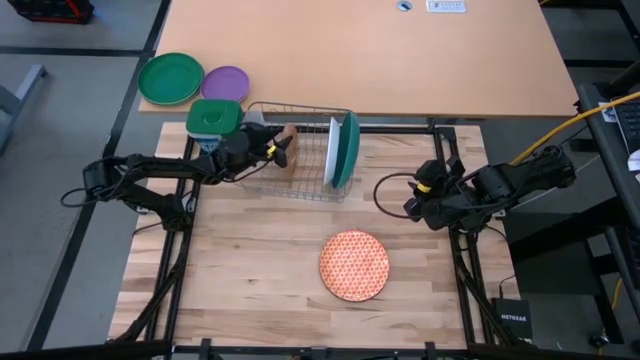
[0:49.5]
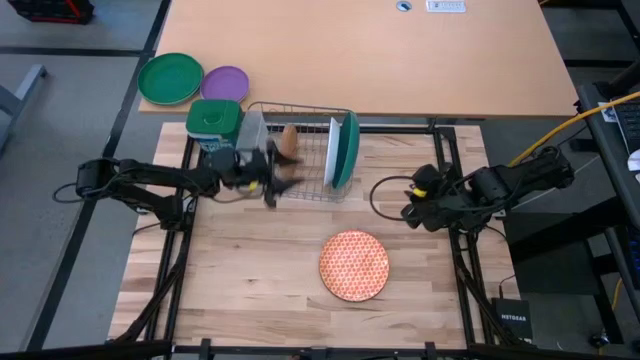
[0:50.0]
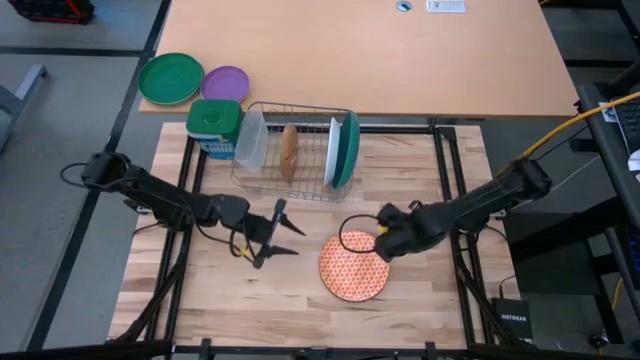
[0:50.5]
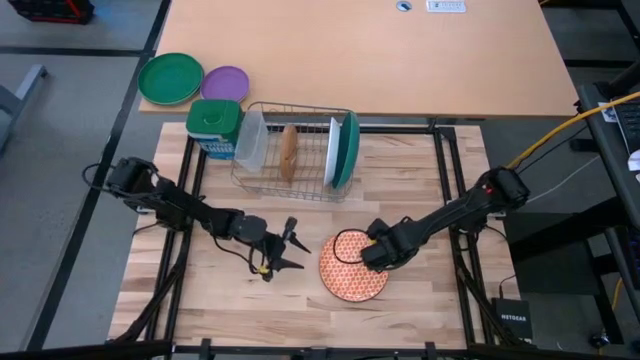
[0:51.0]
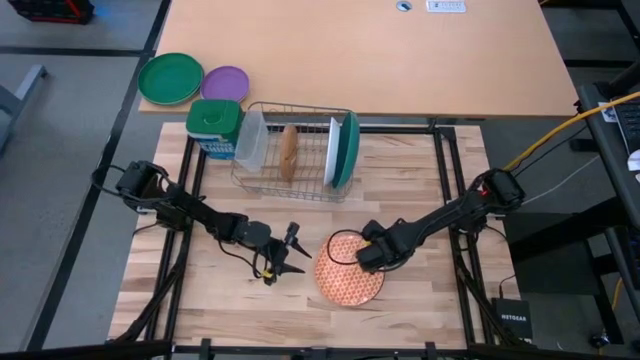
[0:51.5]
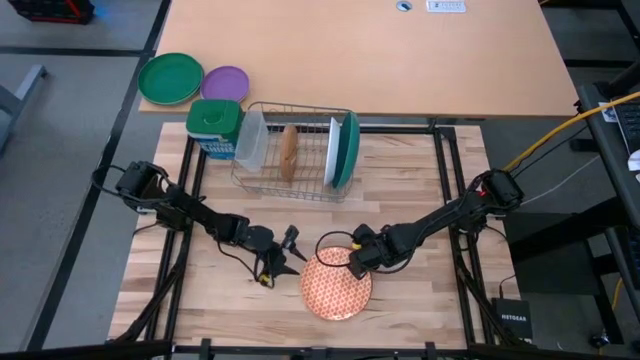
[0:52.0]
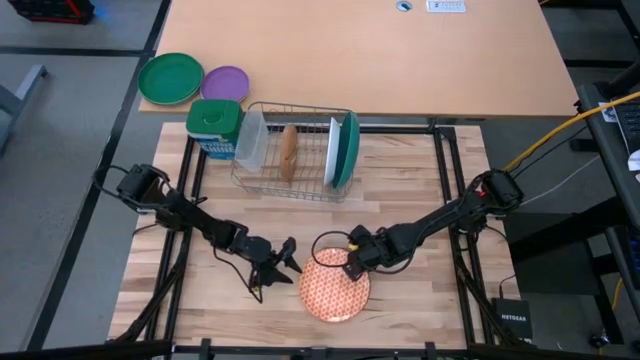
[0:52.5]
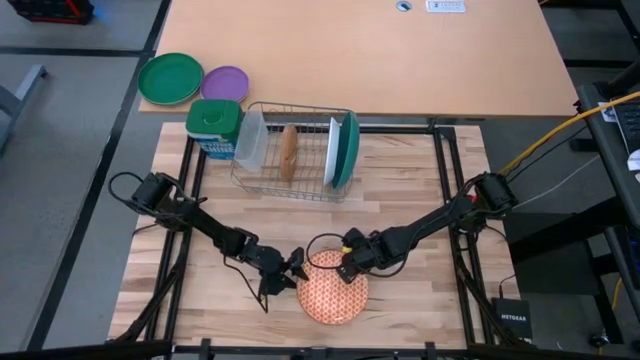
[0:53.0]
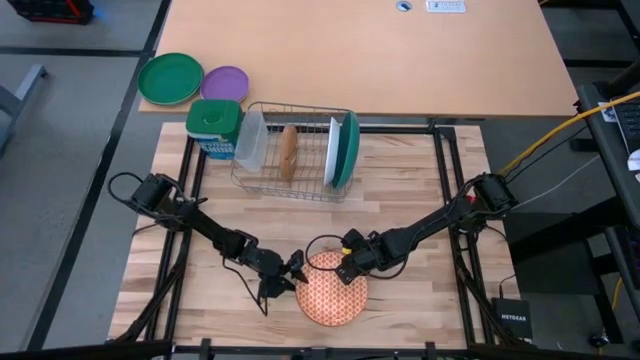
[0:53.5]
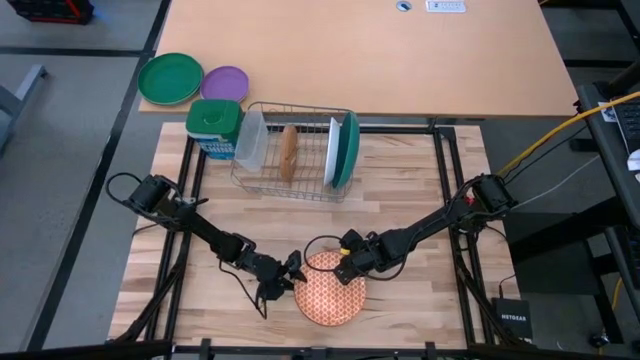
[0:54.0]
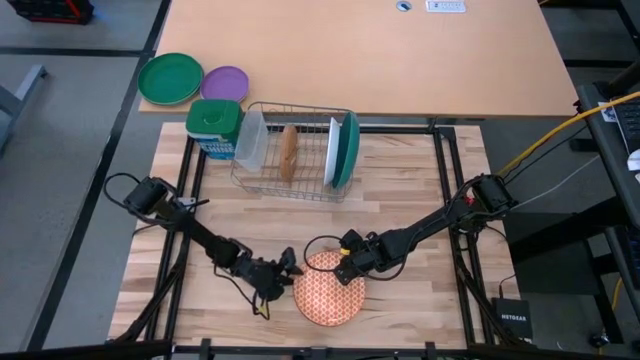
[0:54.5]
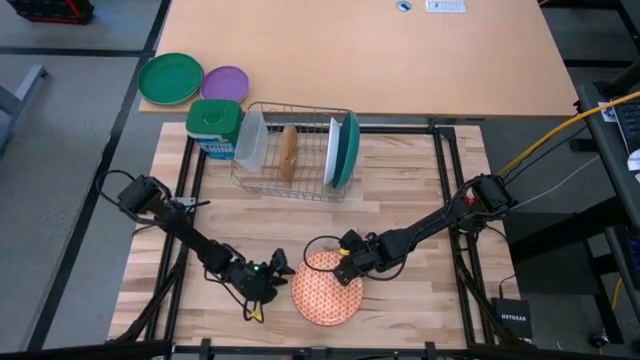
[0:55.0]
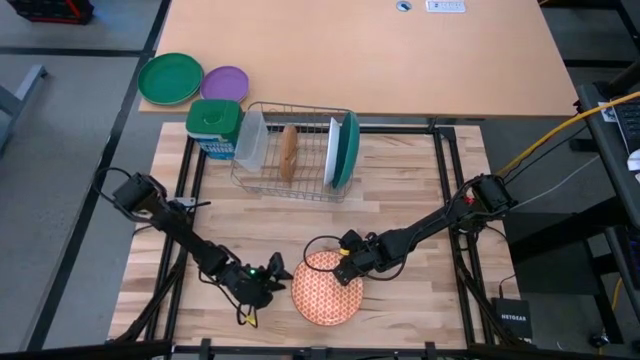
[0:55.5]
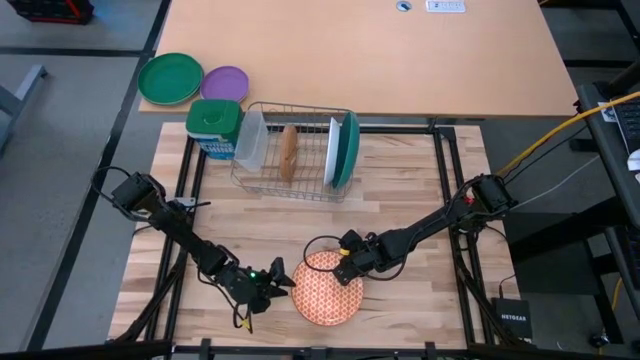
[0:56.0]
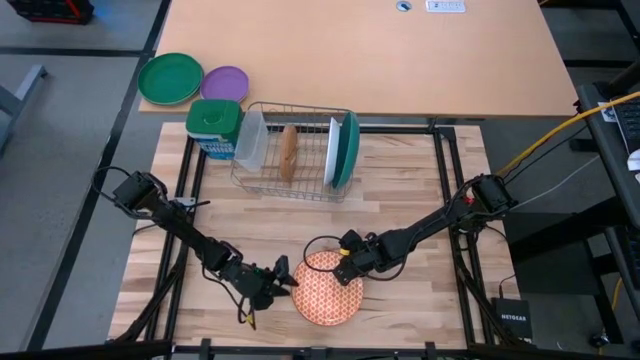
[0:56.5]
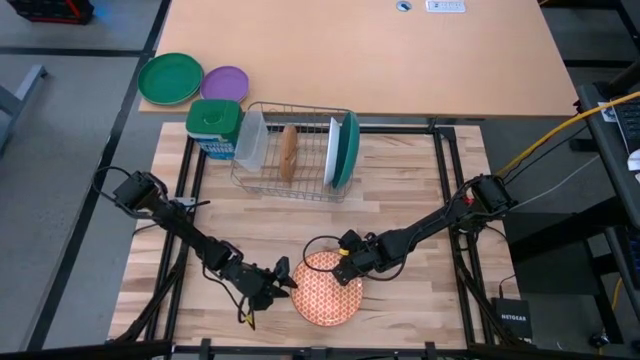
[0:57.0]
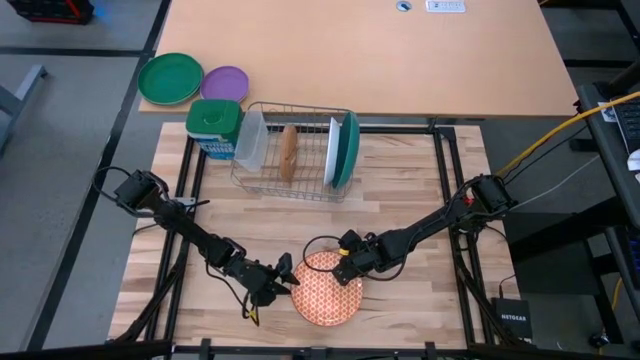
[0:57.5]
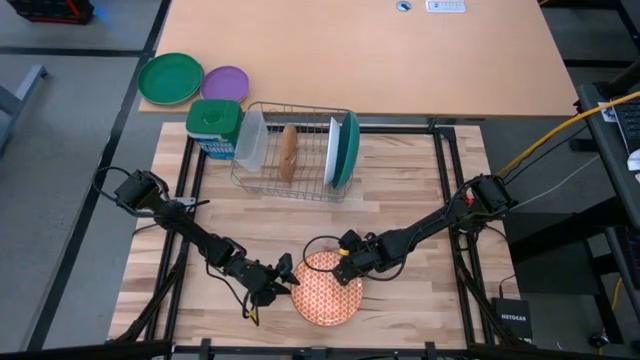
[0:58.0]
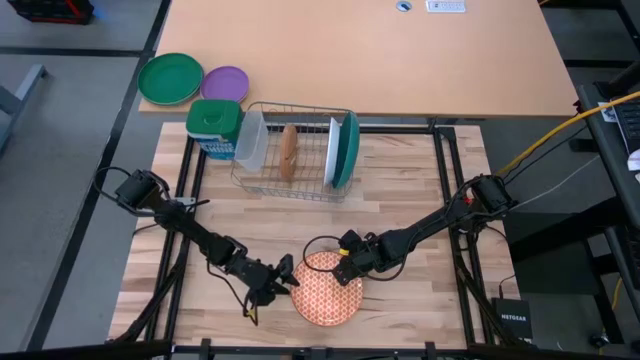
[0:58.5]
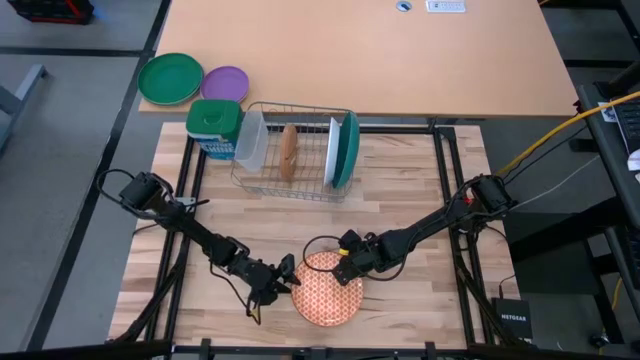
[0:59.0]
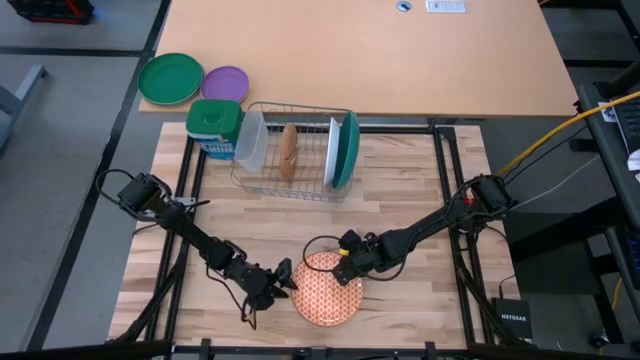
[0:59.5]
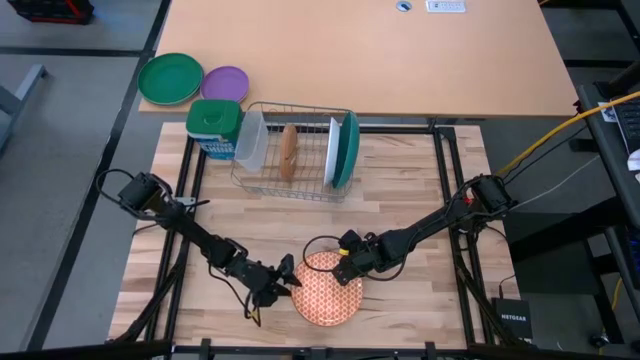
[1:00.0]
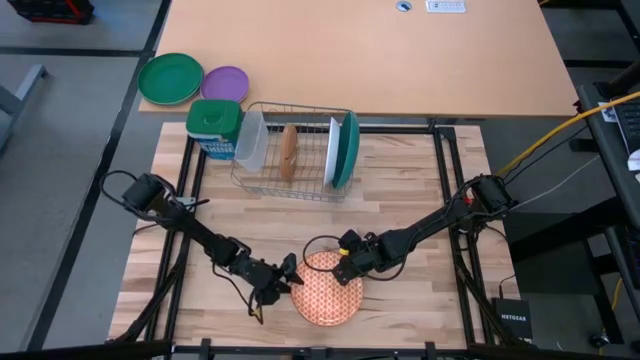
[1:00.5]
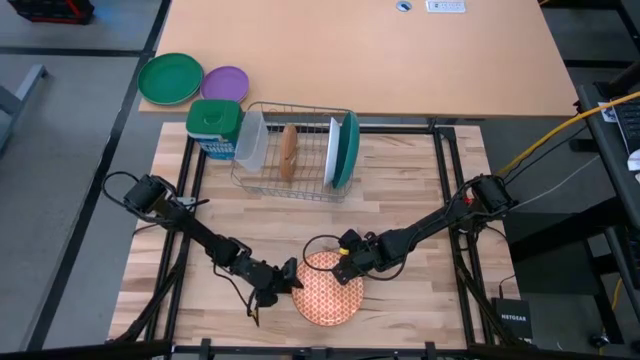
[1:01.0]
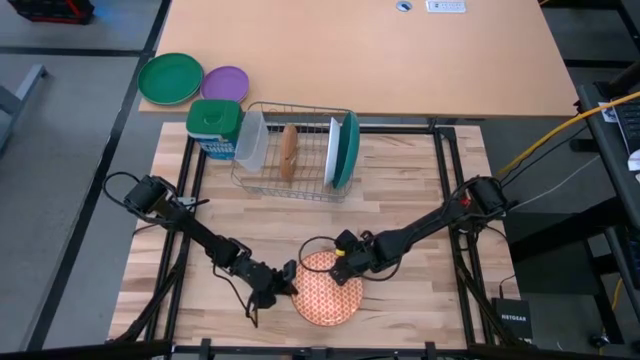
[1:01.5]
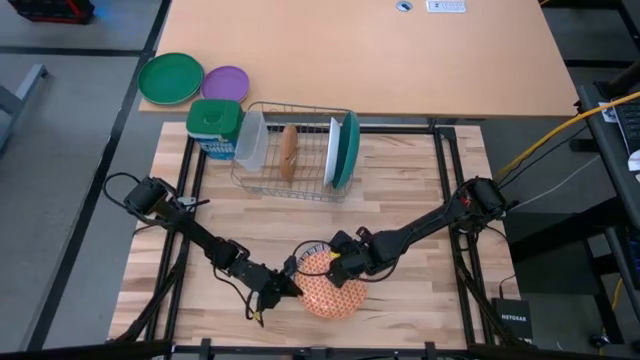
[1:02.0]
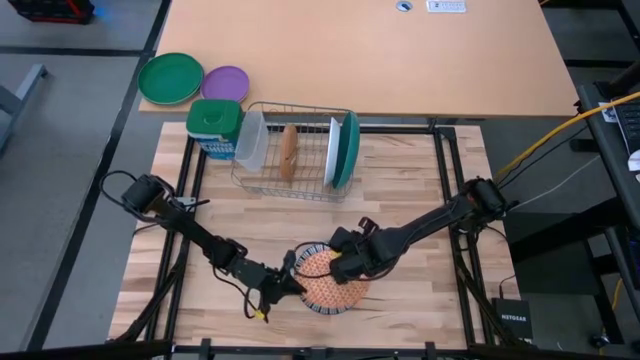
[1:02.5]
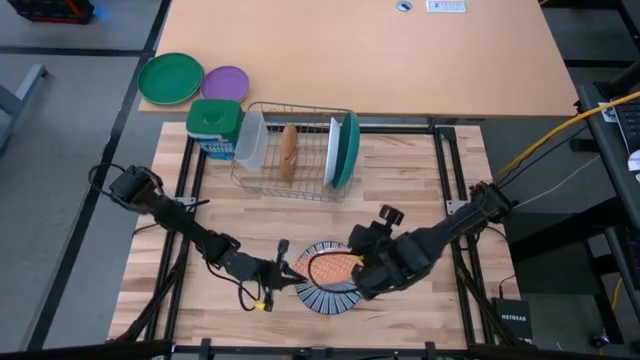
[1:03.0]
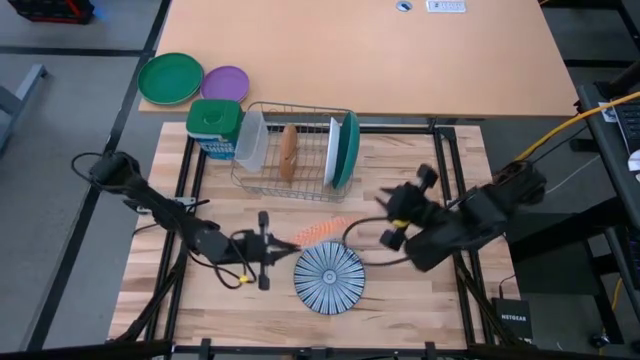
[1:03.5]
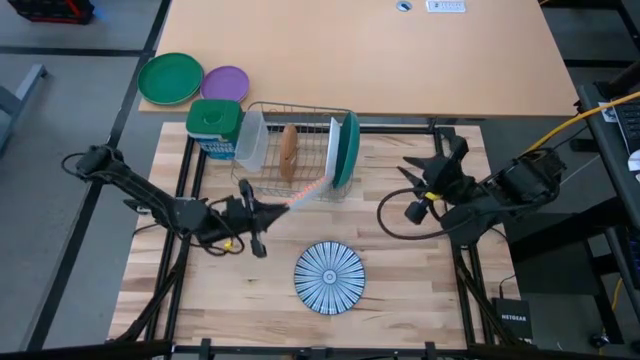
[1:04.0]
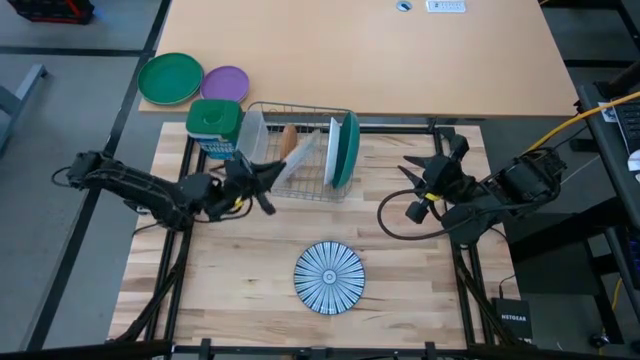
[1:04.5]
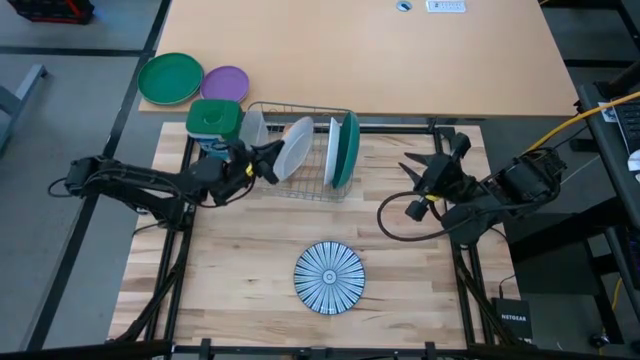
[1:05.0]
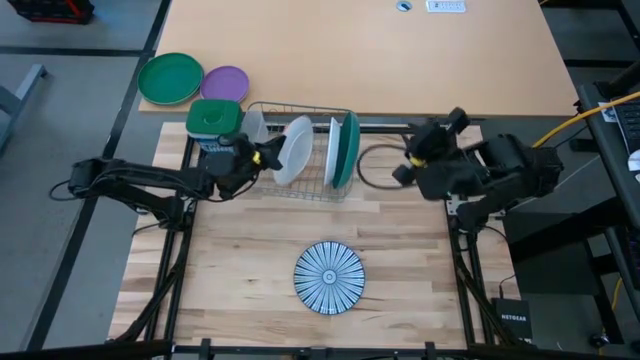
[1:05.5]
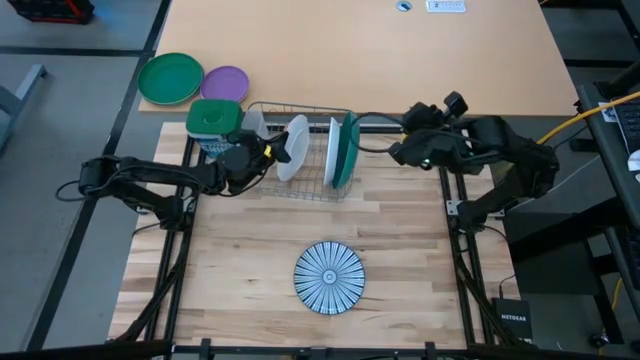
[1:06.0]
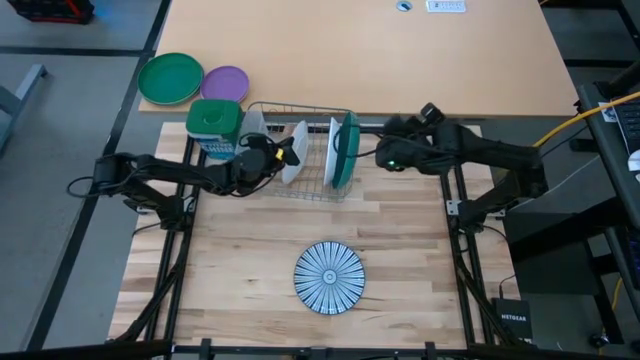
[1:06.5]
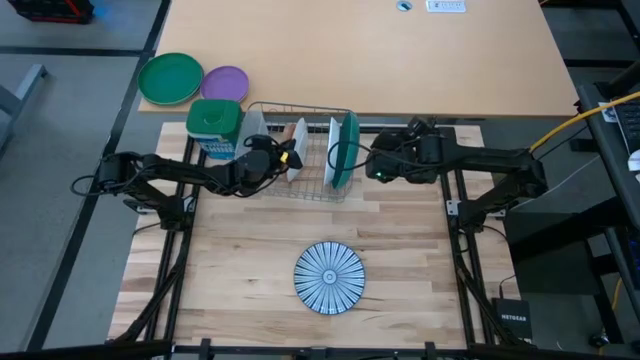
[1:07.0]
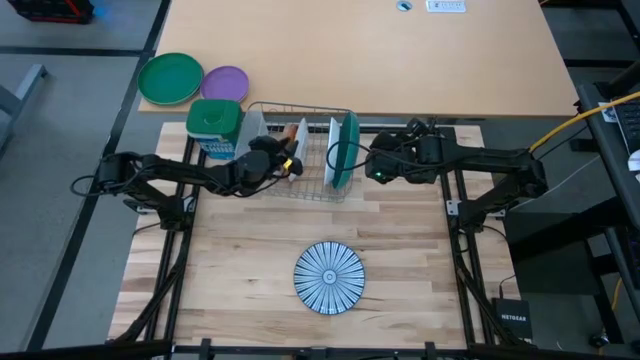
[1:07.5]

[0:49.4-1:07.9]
Task: Sort dishes
Put the orange patterned plate in the dish rack

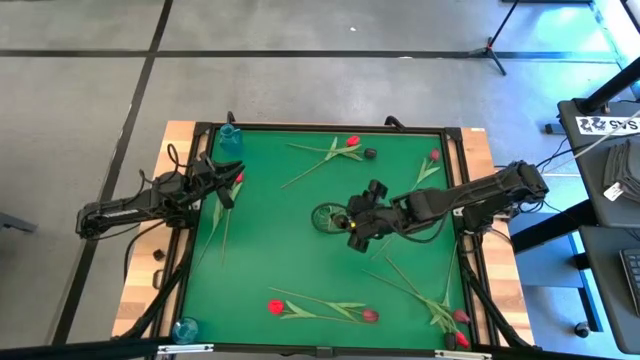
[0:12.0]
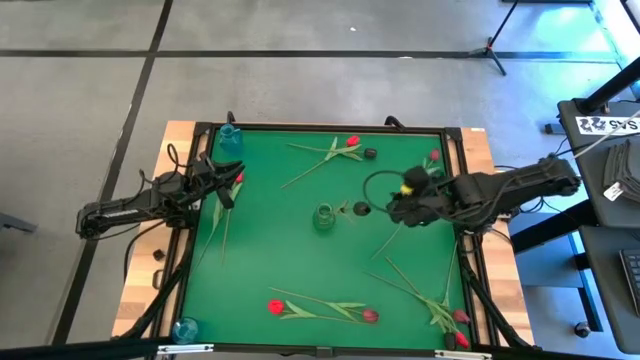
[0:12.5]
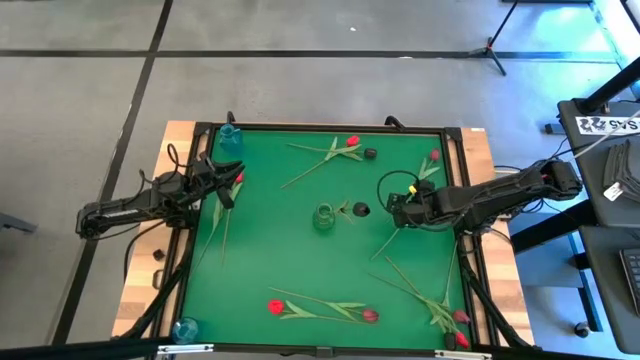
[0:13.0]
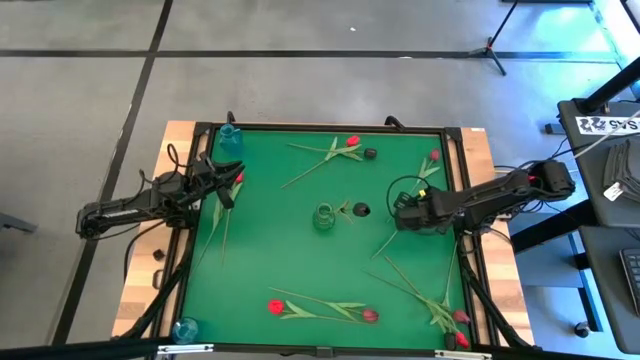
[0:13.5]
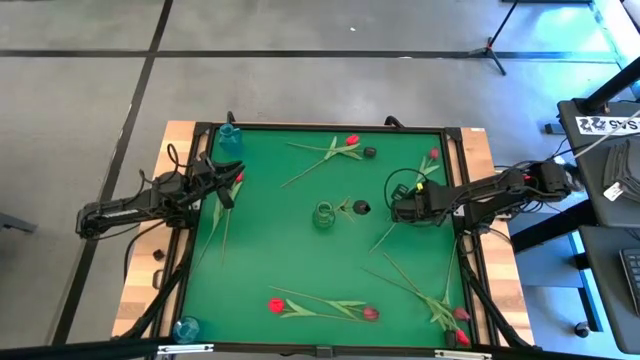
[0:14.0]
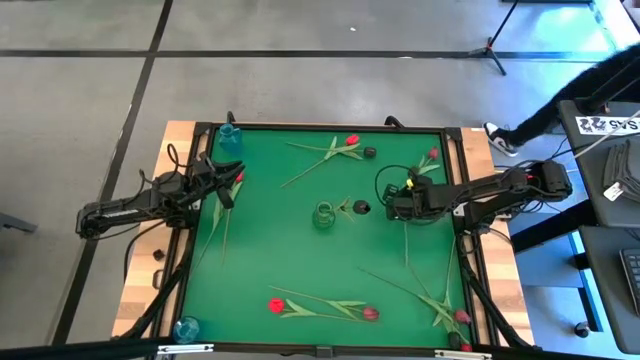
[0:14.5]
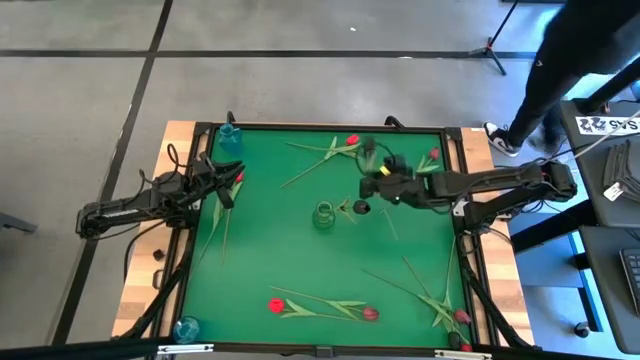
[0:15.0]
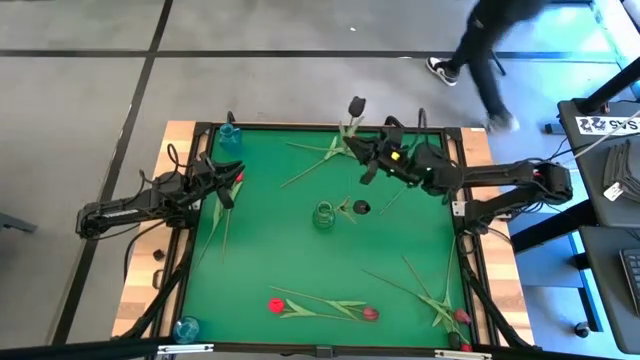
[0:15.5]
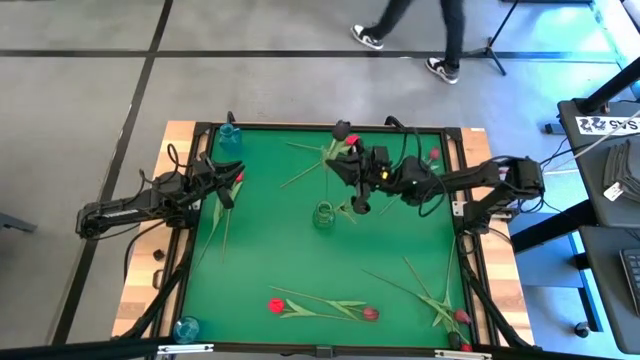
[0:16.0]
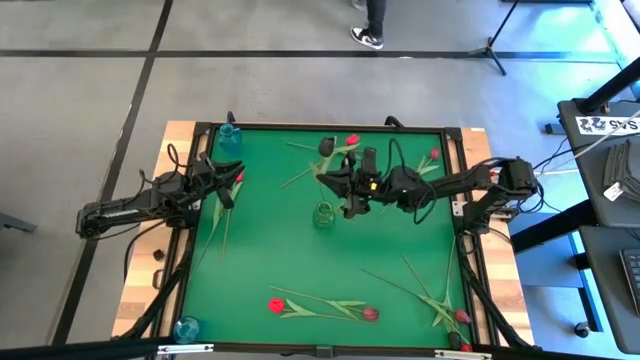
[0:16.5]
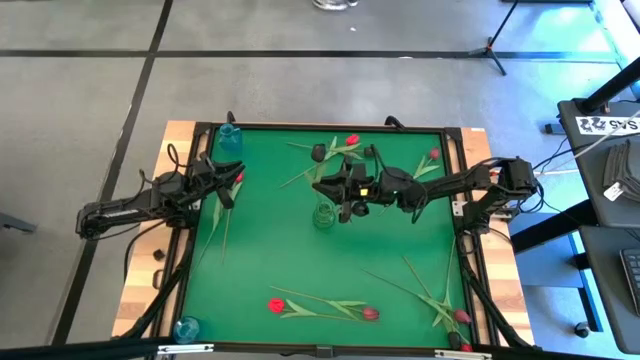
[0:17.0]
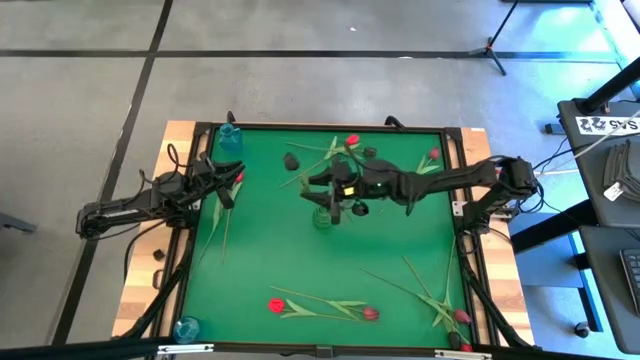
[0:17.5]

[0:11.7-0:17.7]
Task: Sort flowers into vase by color
Put the black tulip into the green vase
